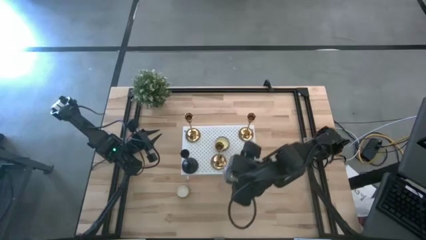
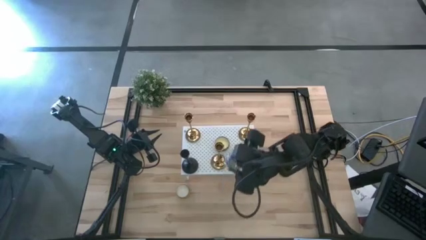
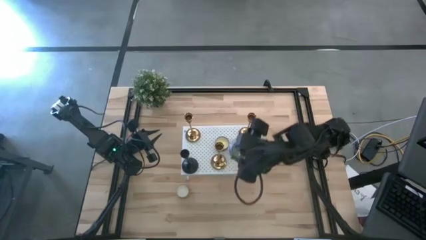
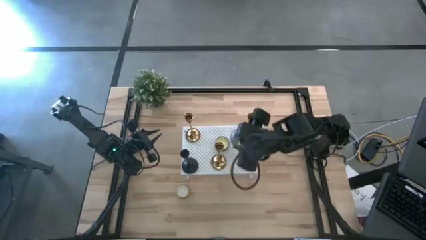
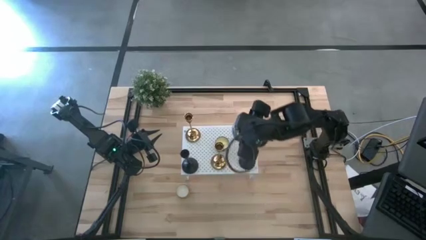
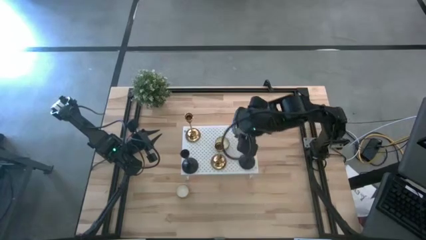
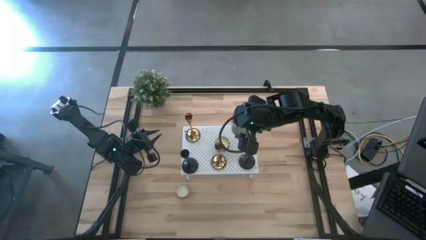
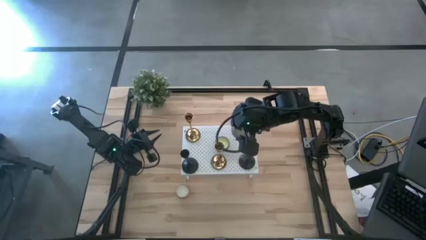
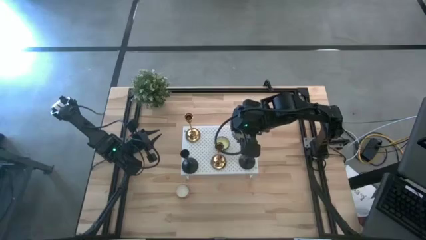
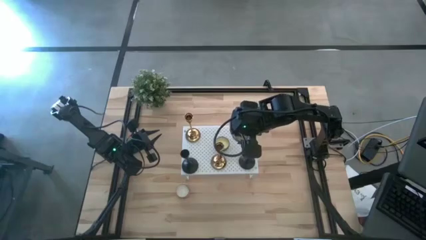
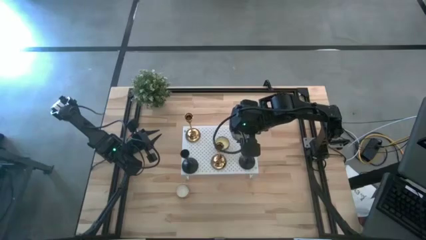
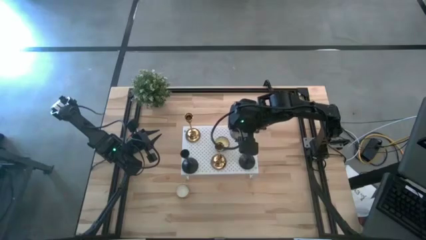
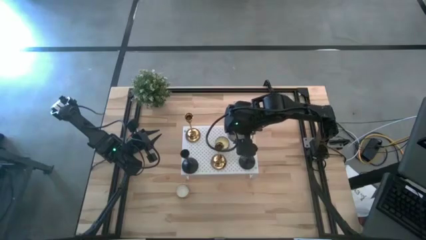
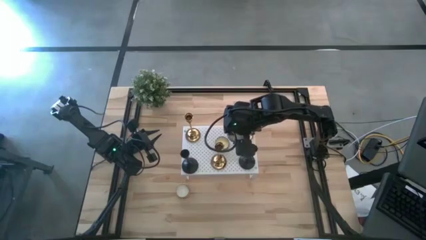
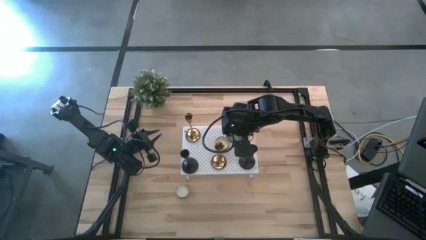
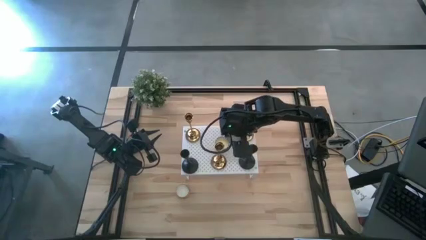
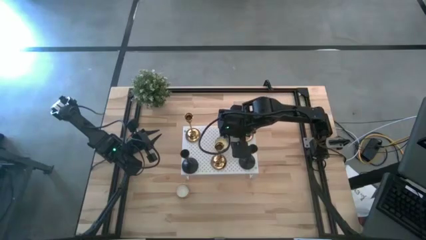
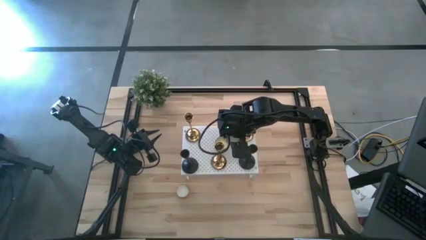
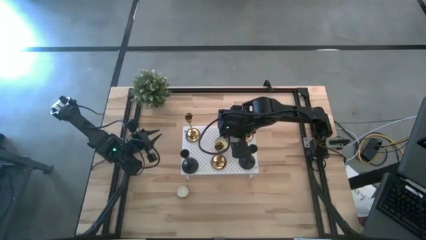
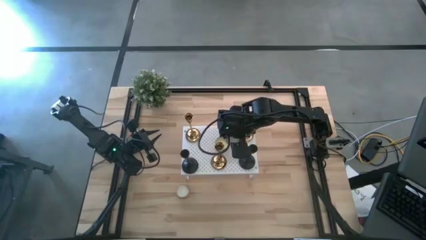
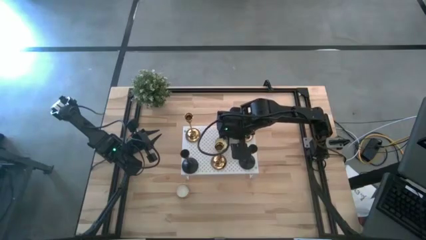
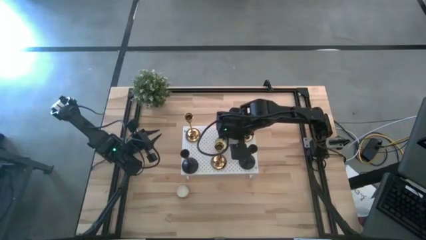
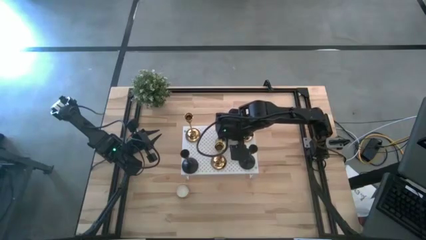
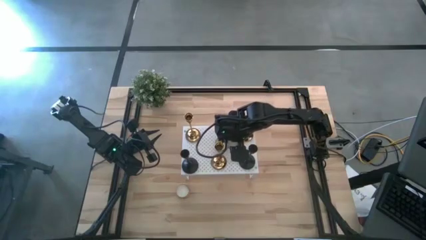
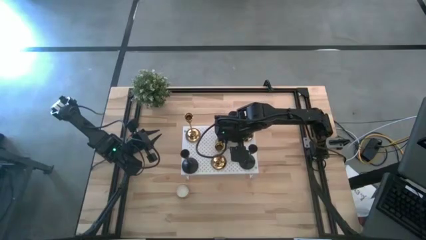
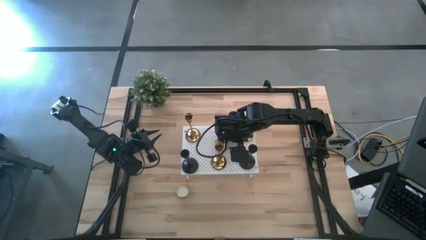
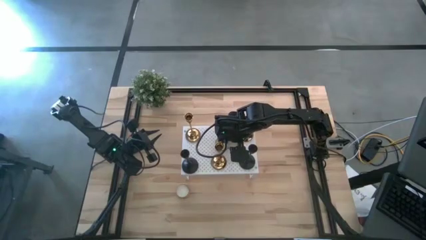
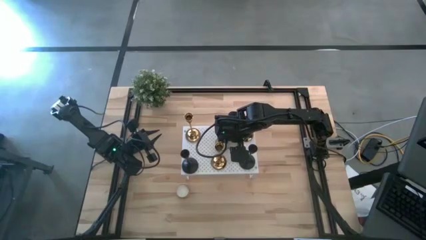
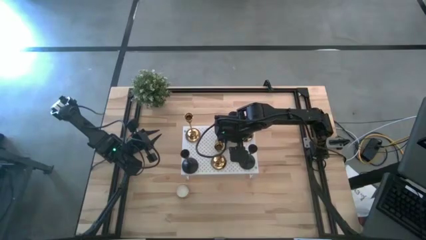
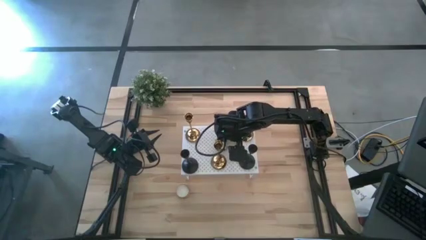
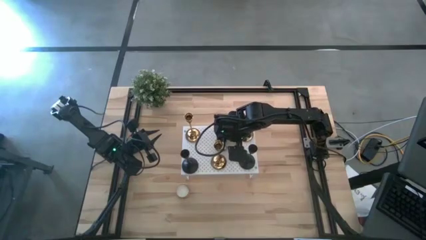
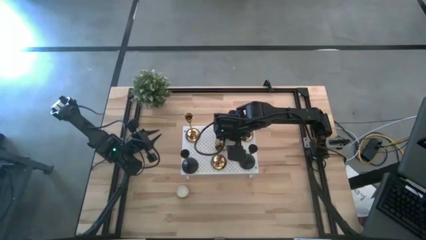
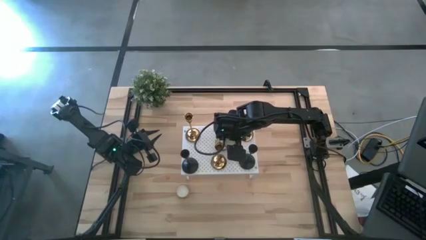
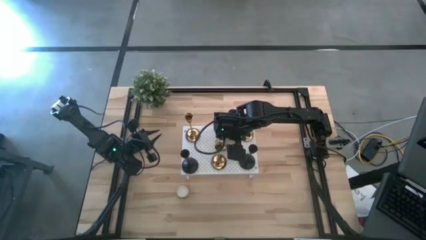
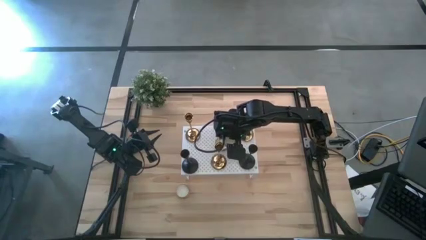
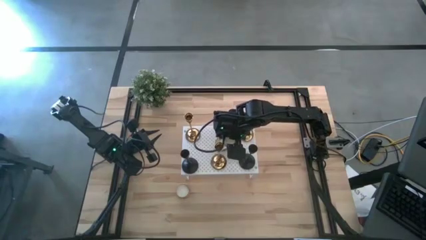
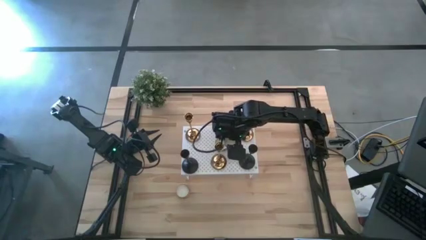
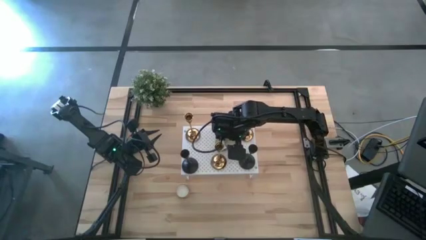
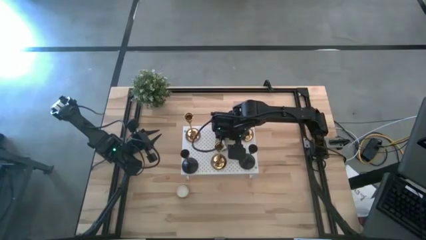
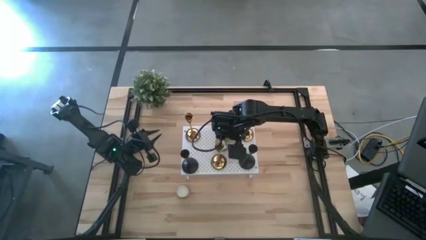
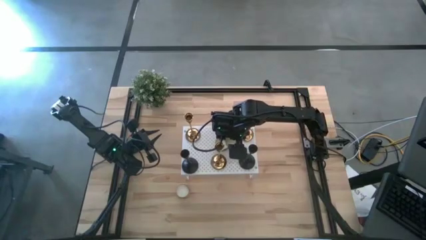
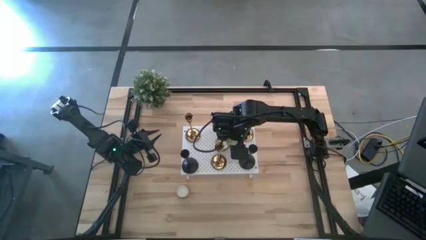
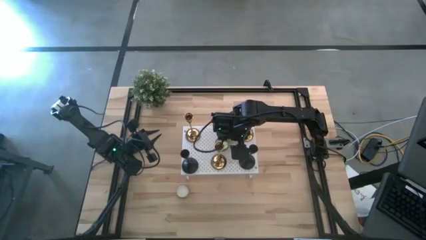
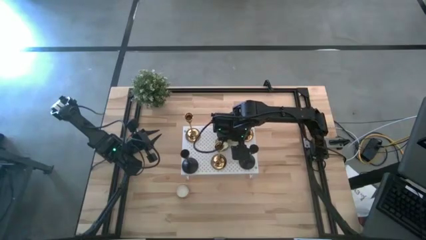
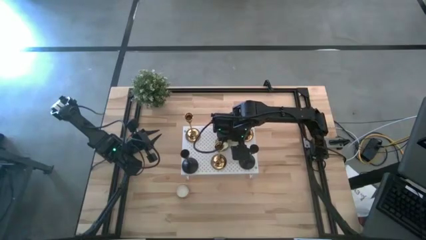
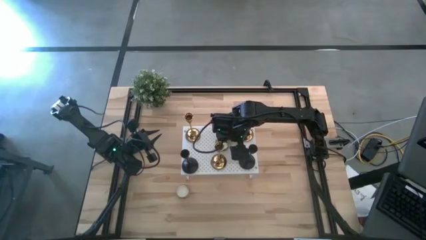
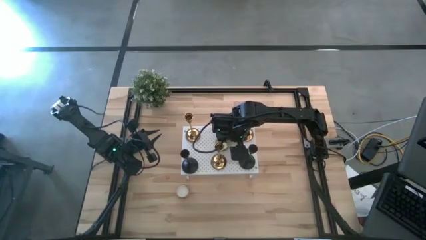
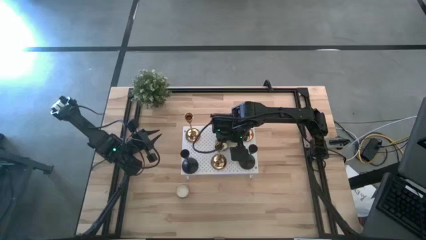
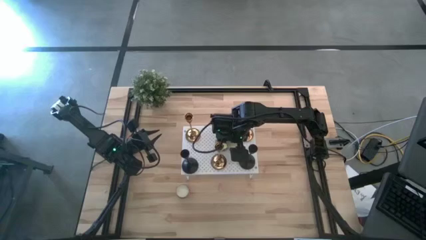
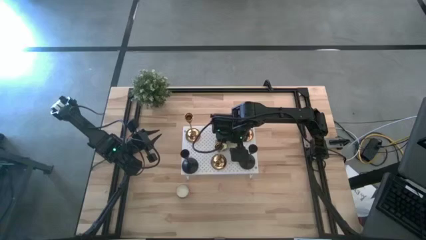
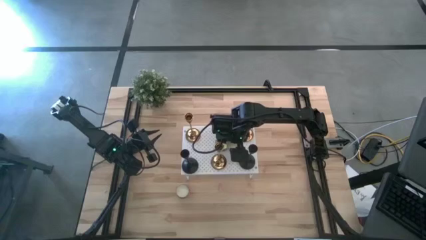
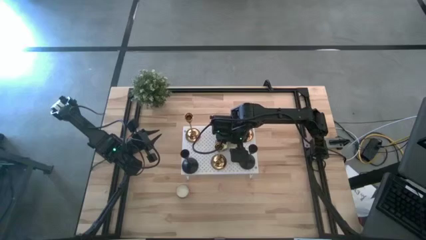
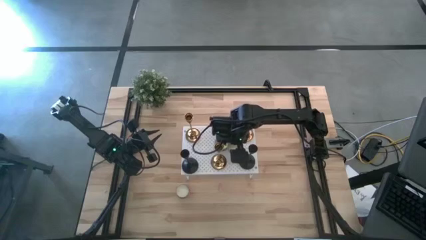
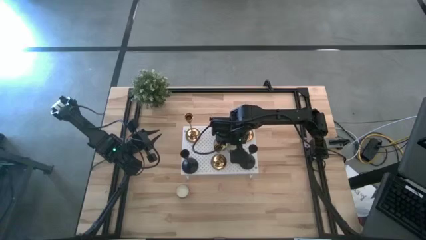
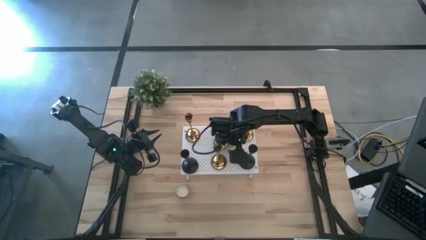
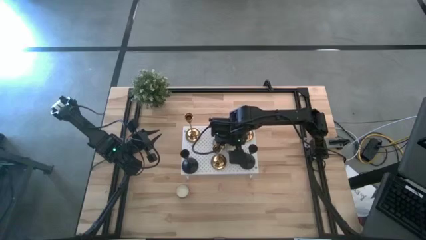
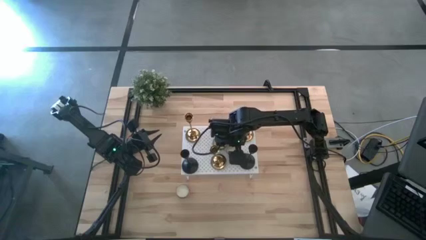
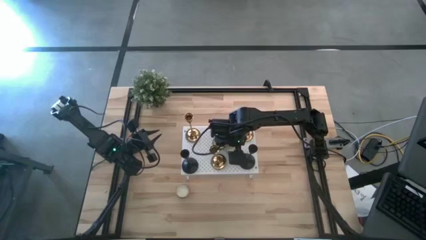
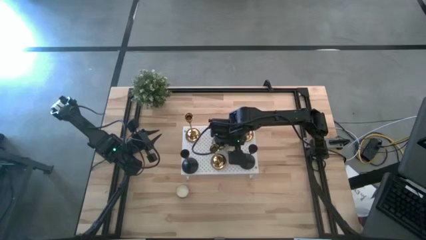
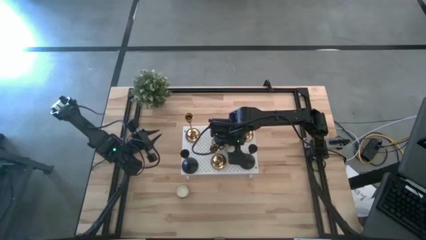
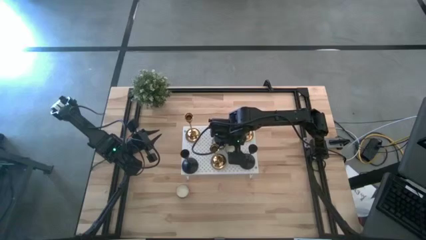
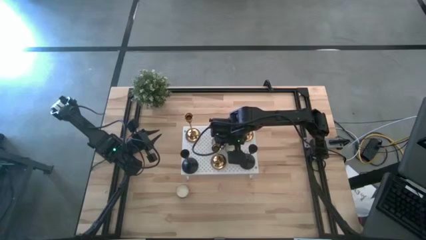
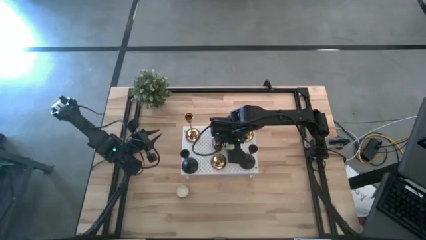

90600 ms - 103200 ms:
Task: Pick & Place candle stick holders
Put the middle scented candle on the shelf

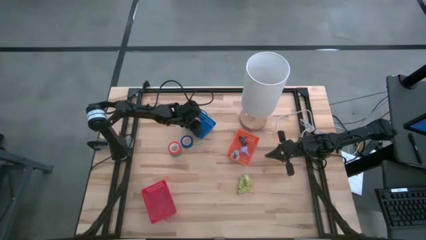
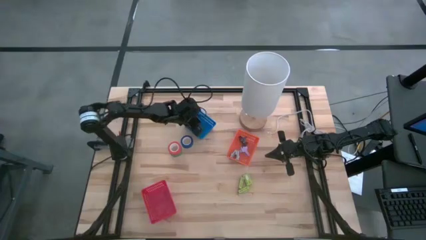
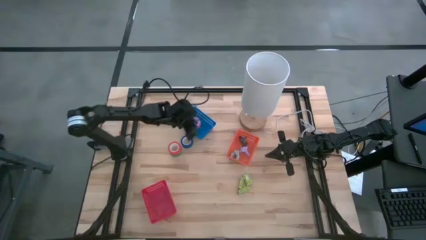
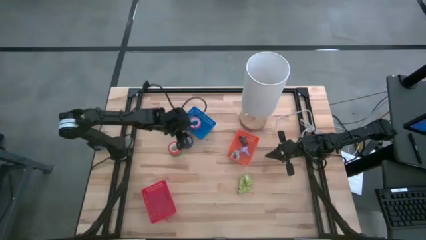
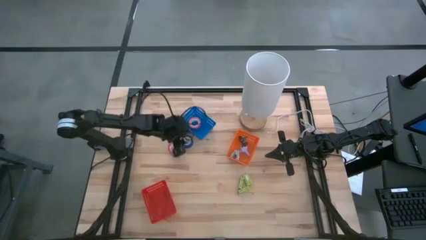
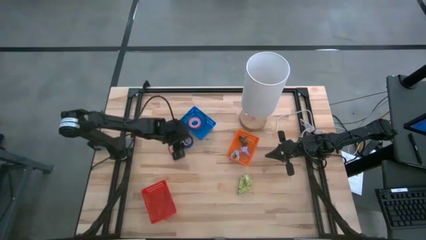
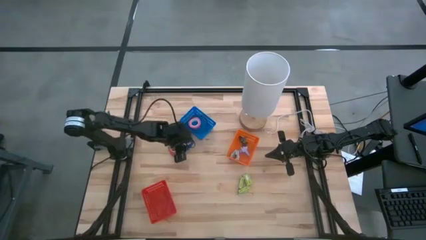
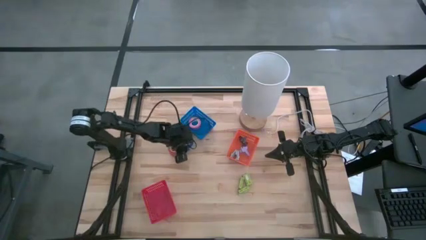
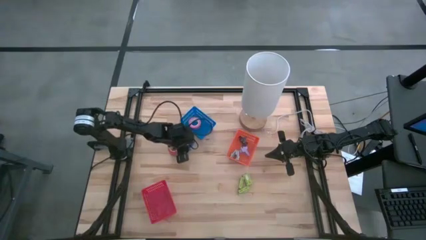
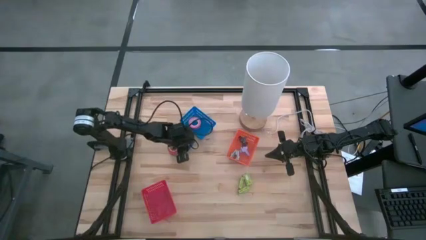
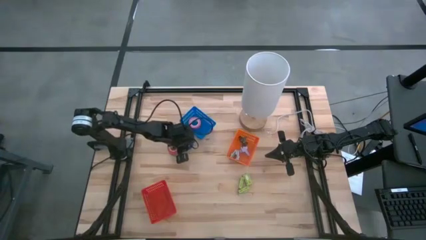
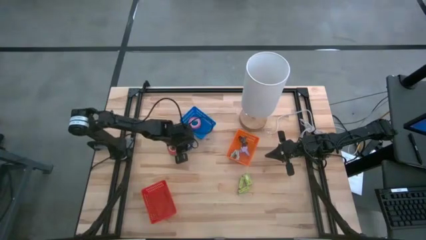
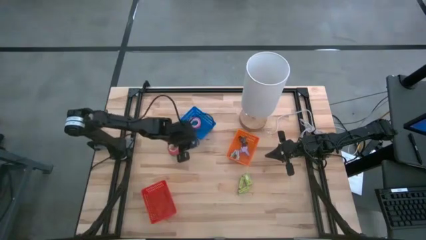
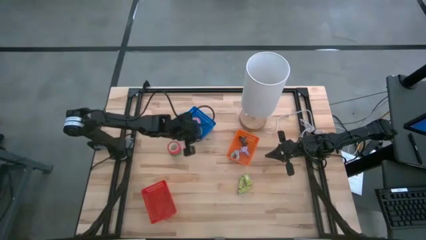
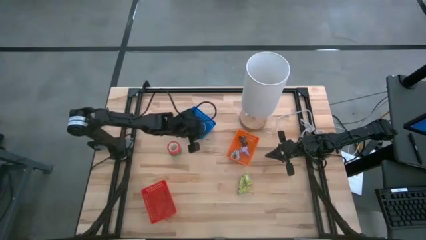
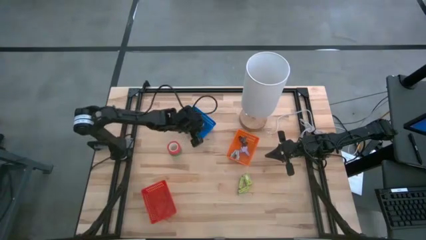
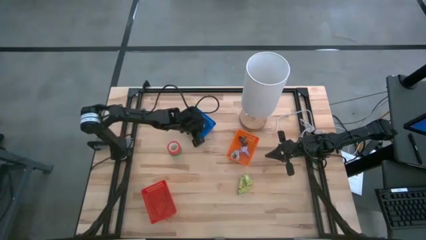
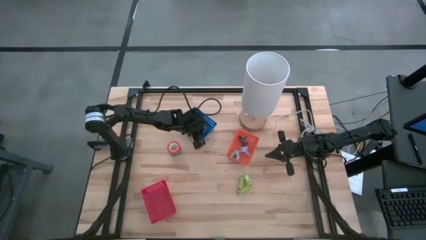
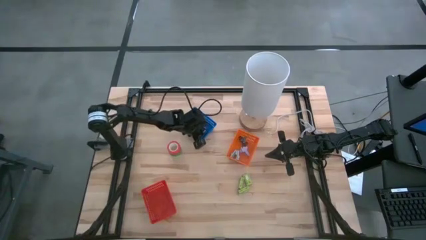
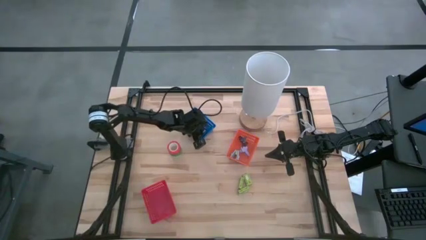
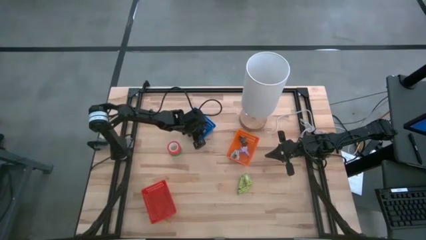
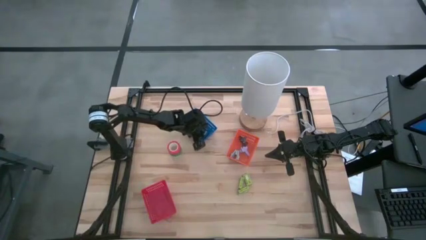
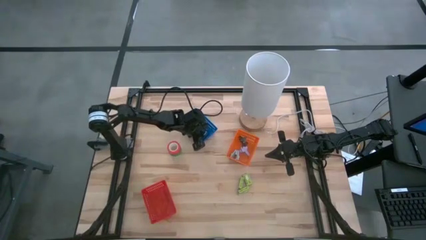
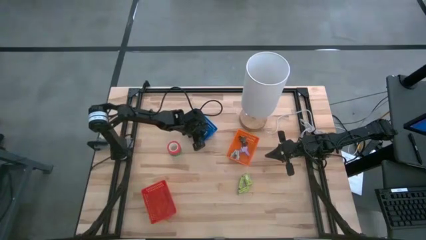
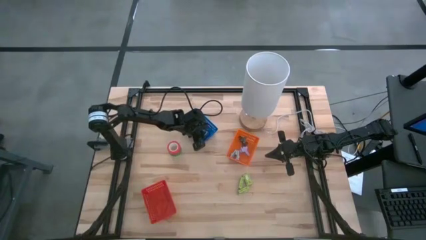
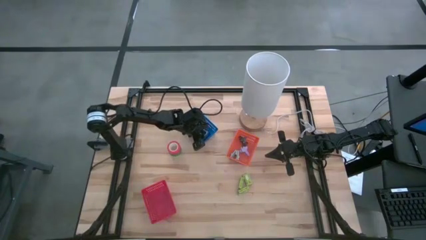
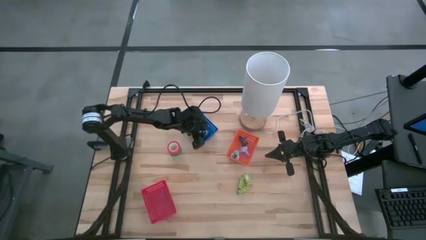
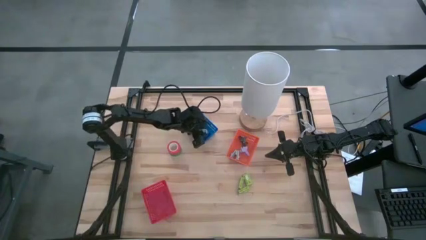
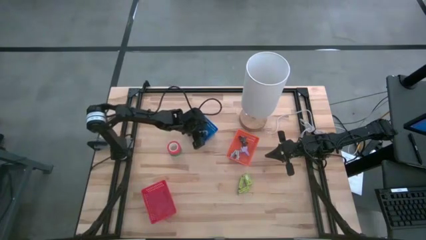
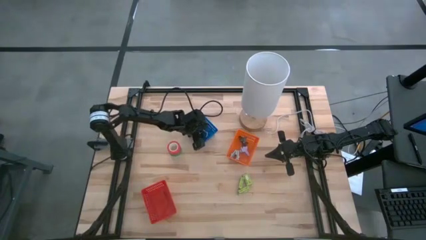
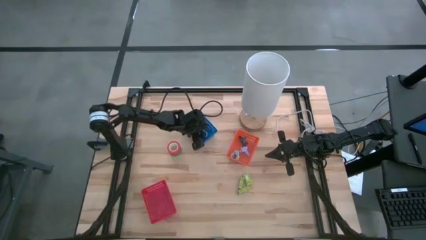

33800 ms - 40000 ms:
Task: Pick and place Stapler, Stapler remover, tape
Put the blue tape into the blue basket
